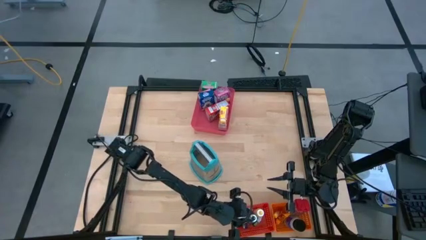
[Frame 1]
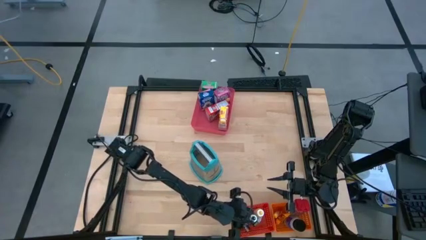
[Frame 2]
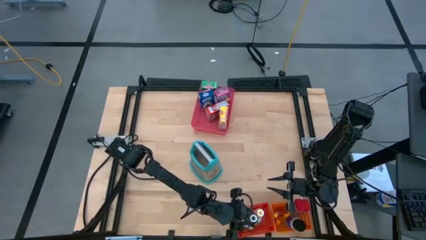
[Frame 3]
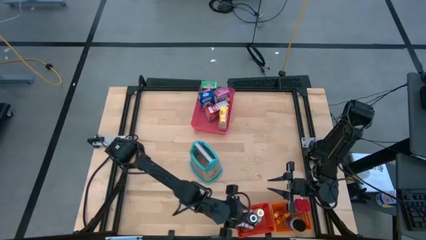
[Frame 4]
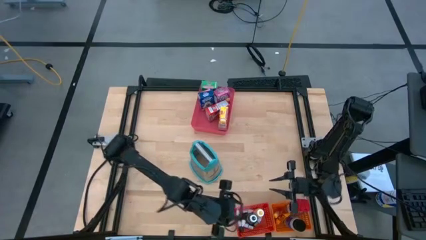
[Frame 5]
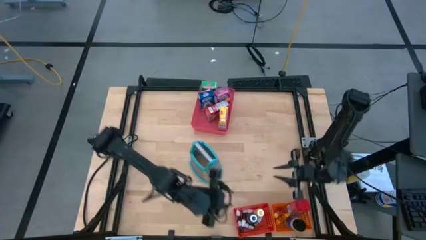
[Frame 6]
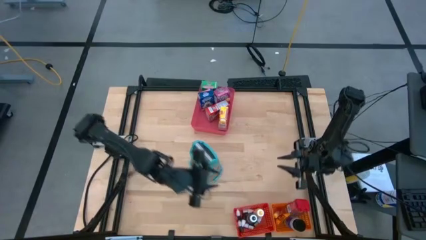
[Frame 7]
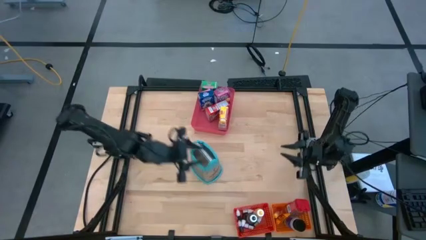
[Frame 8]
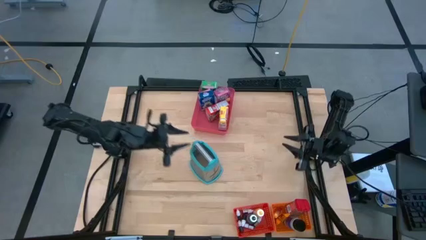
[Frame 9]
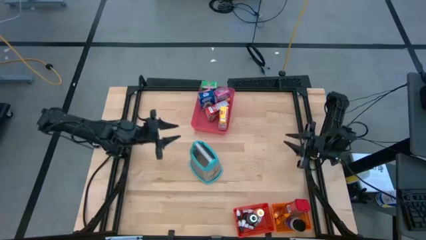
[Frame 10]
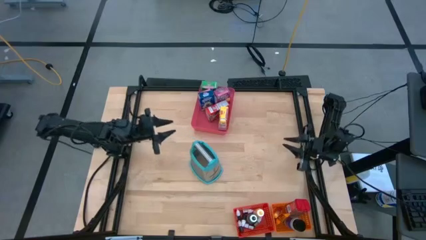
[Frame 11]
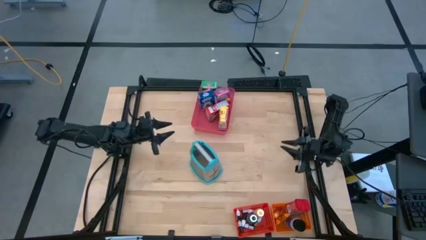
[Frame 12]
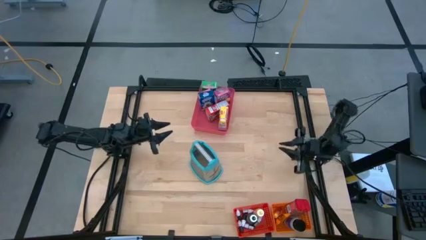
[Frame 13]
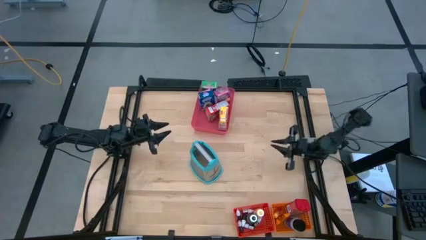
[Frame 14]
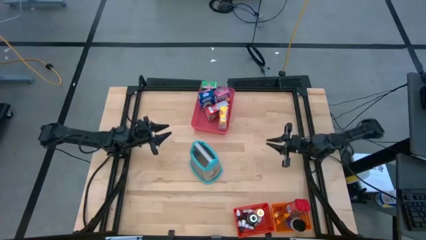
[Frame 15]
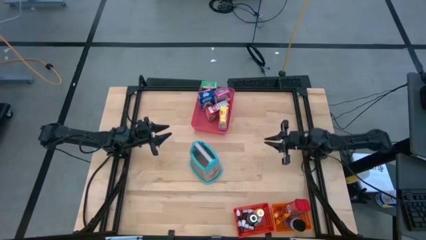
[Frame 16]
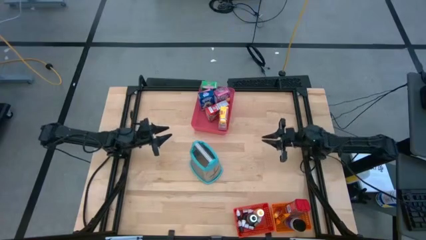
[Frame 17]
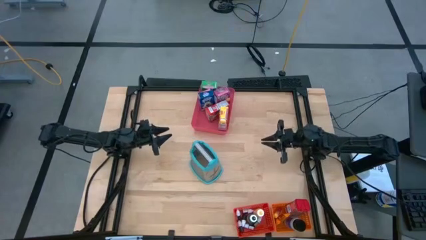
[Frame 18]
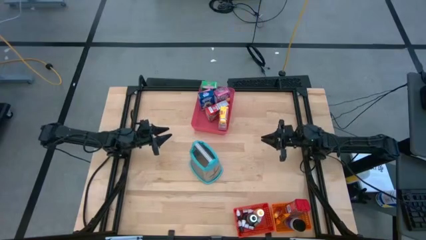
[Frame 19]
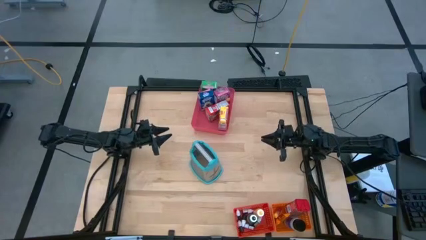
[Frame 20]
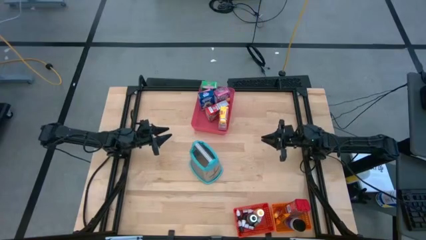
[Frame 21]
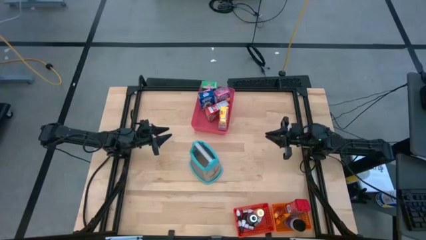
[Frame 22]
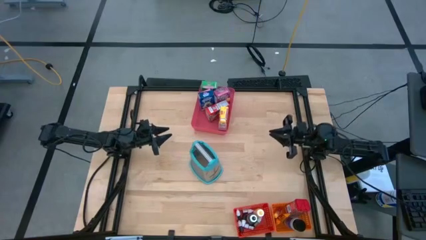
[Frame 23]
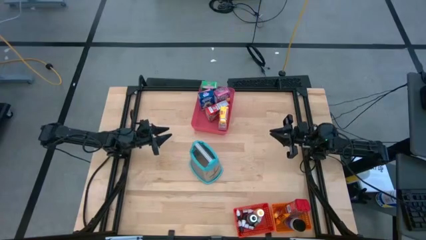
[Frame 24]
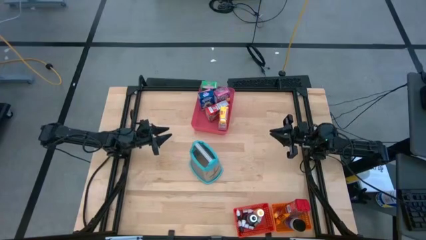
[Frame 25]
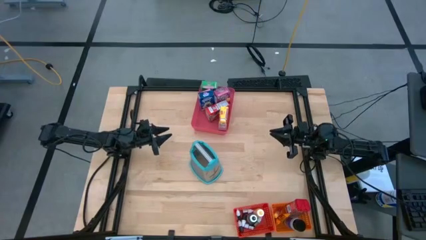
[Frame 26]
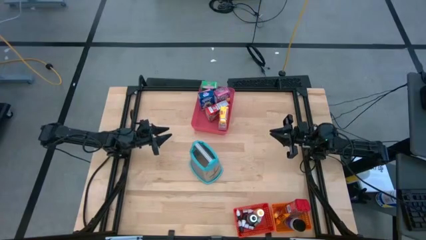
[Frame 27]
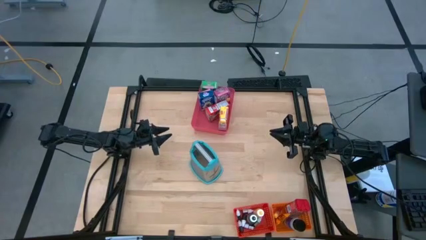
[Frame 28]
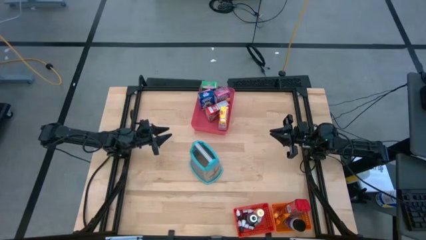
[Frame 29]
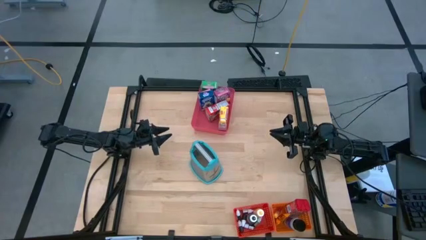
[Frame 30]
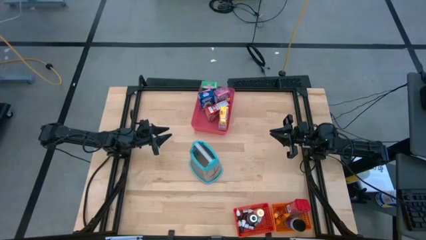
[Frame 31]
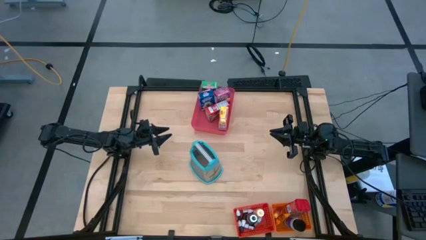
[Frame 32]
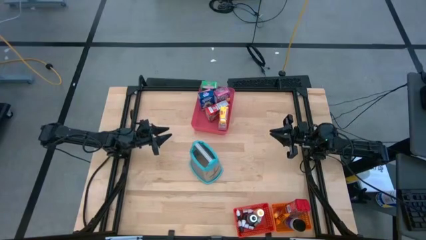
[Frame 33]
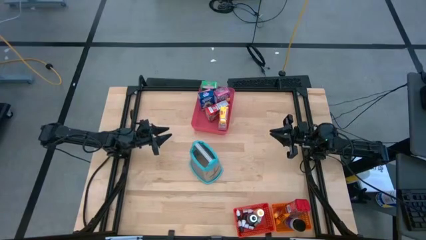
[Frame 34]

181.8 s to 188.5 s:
Task: Pick & Place Kitchen Items
Return to Home Position

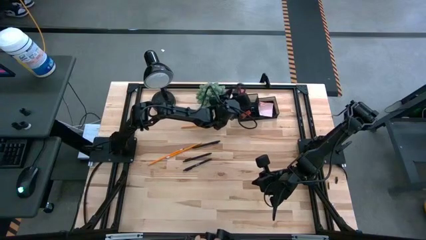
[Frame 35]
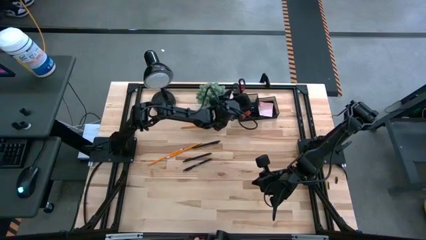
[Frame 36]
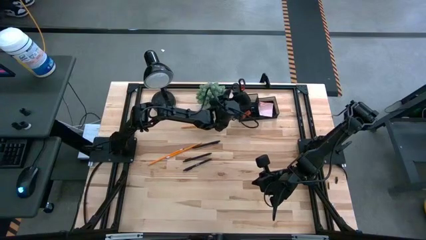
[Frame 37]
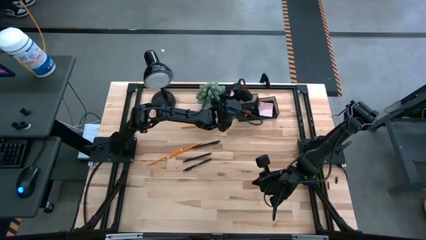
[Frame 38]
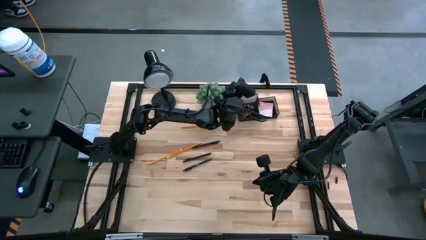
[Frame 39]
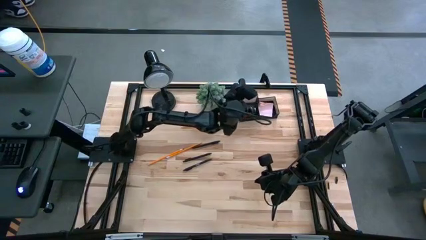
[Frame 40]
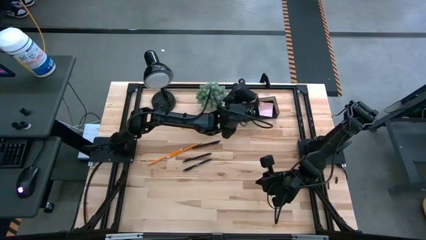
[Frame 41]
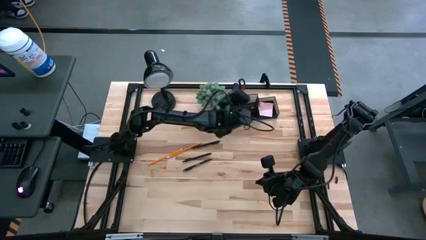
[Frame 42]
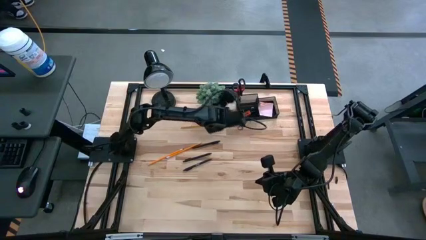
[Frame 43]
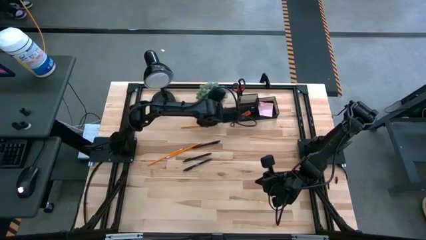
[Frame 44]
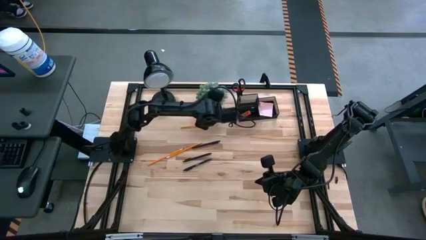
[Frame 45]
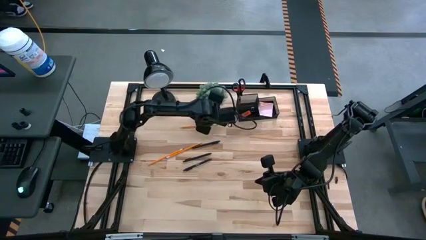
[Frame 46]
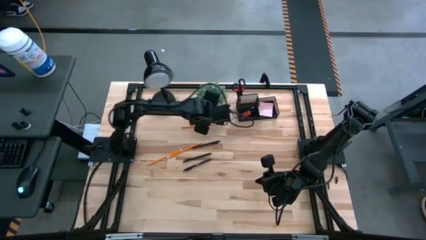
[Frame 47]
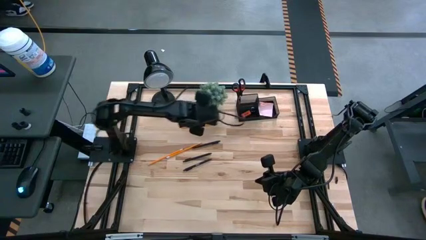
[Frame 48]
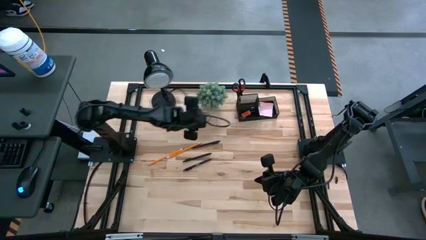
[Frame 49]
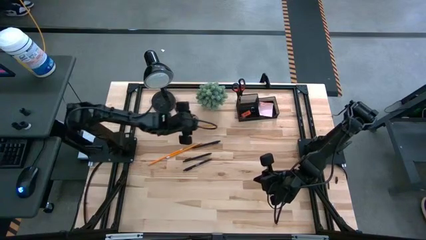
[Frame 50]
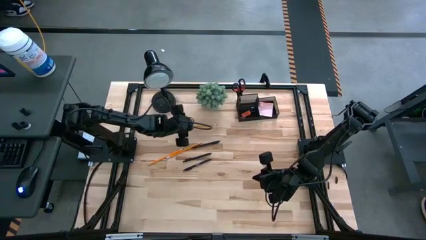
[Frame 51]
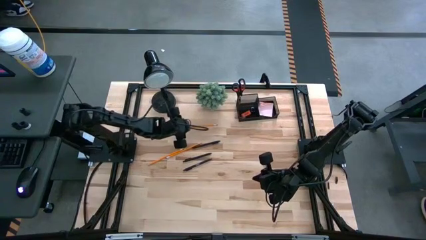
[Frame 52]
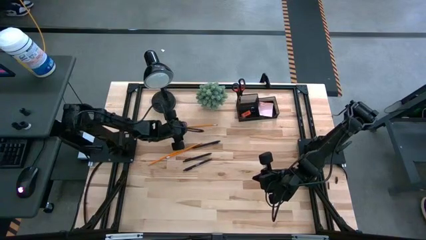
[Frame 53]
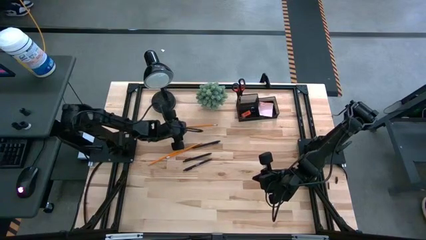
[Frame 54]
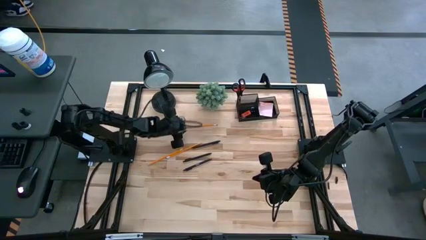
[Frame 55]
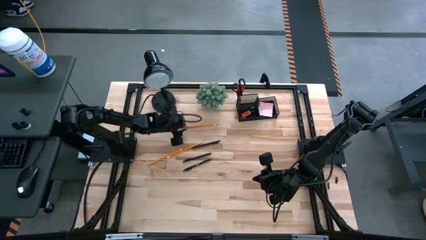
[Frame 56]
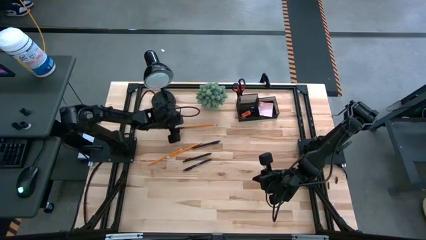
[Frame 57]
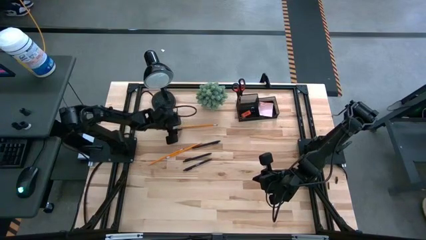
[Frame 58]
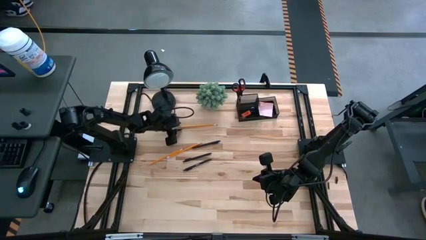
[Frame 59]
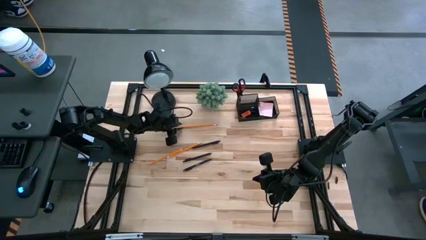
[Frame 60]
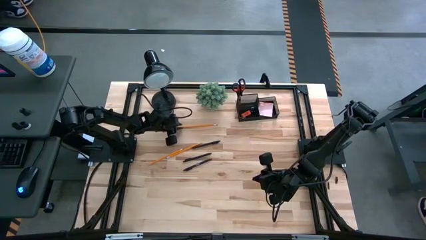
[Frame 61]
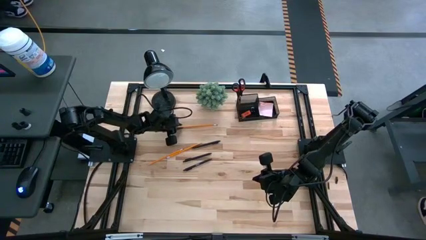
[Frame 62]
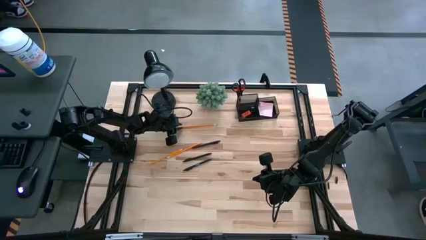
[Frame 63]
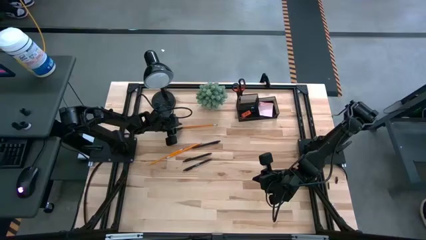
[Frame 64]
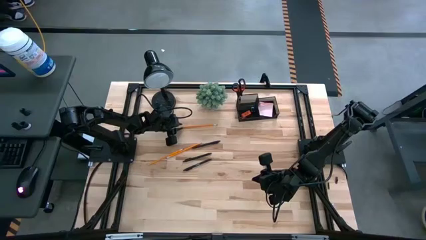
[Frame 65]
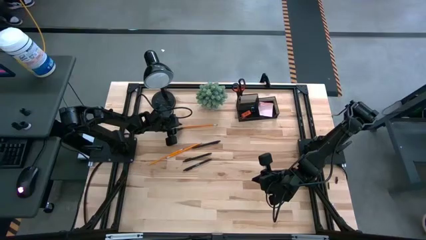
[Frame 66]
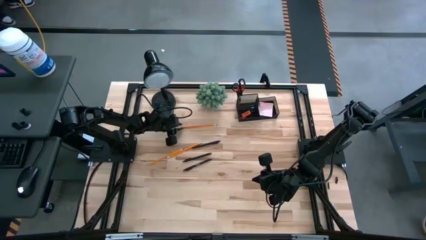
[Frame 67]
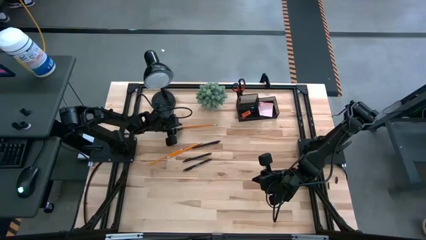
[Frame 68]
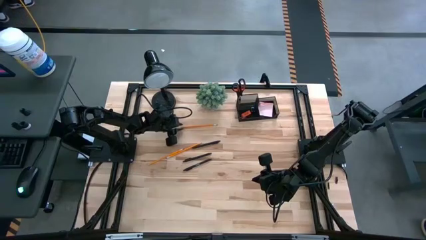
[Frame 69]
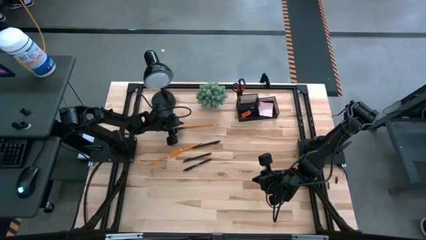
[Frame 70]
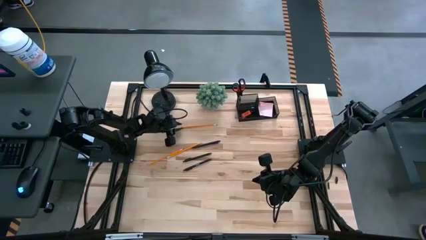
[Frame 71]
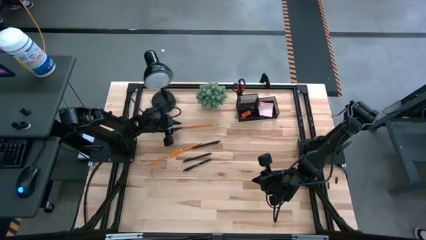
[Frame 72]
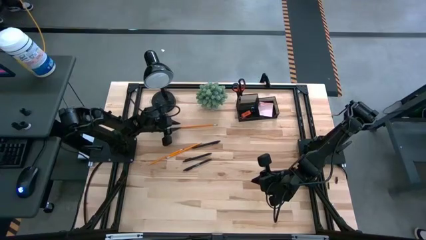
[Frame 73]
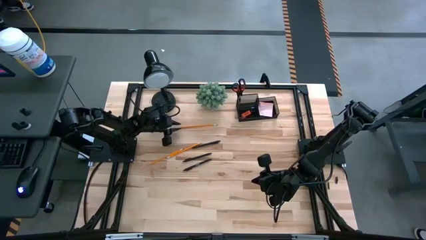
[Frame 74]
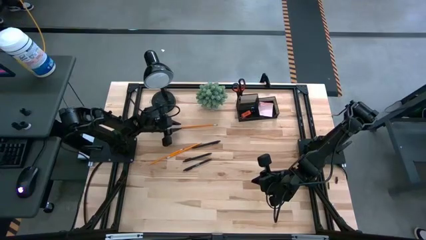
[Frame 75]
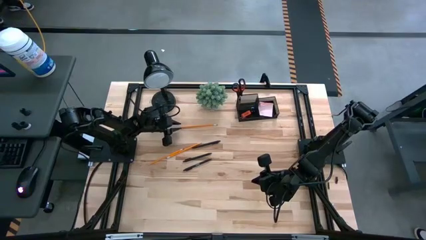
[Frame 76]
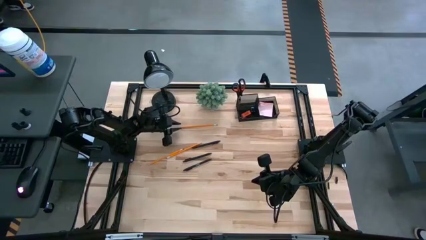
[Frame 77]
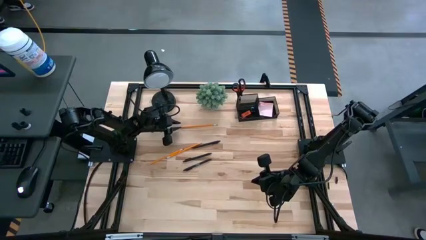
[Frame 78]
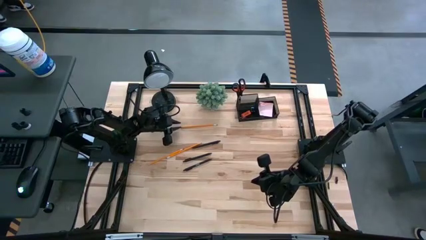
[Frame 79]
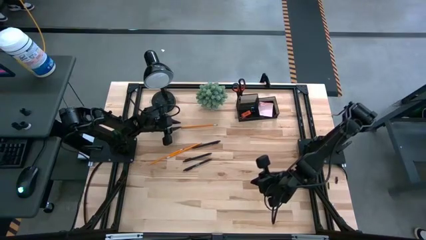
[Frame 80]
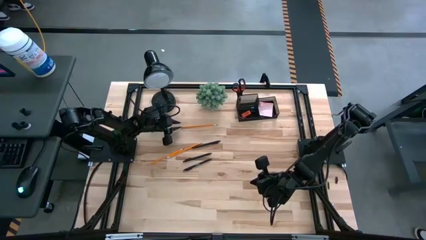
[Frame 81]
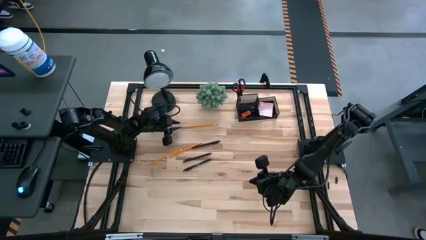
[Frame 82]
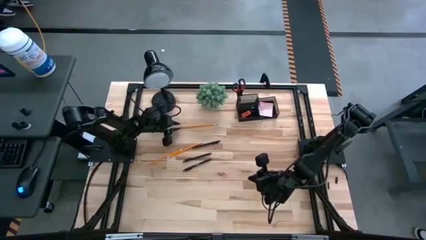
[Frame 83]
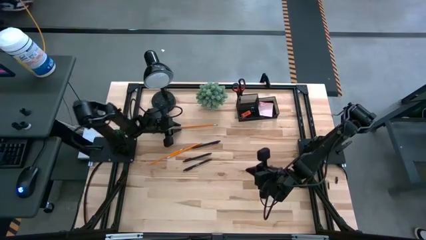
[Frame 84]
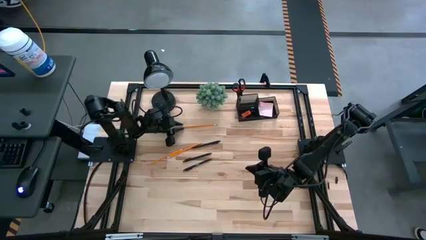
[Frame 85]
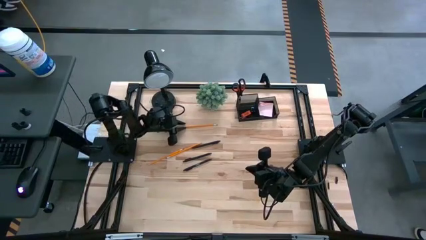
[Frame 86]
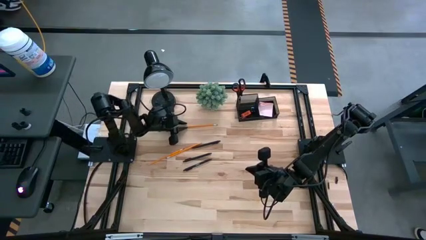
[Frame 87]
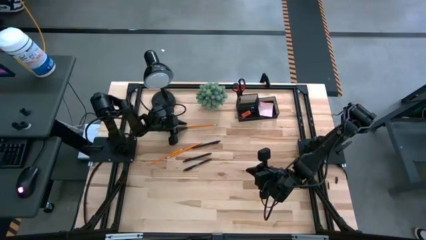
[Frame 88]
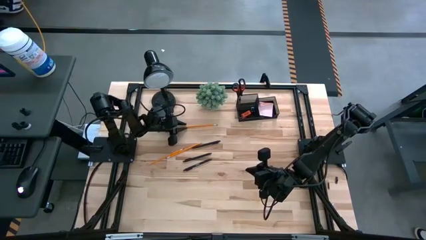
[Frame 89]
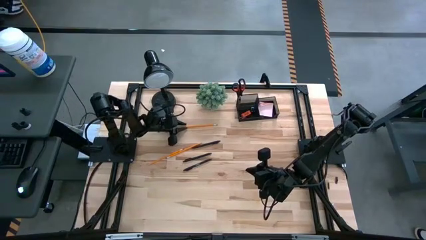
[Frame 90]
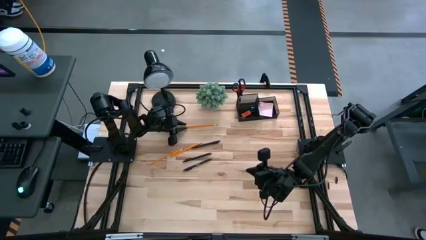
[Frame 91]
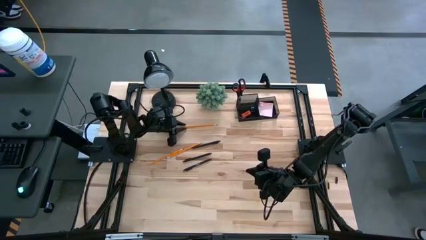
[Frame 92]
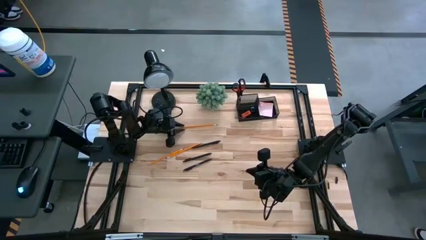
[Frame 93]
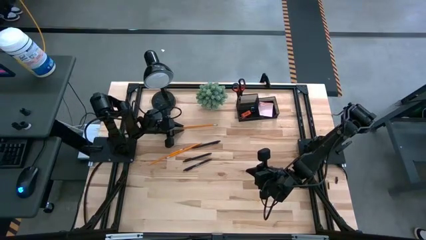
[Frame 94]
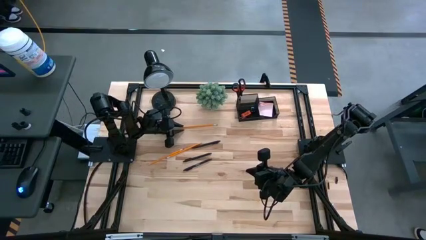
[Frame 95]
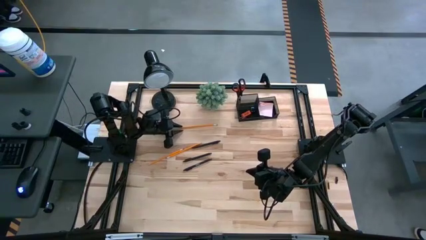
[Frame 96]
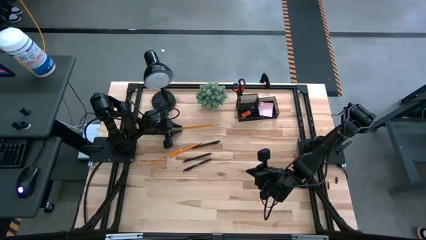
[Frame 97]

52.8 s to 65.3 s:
Task: Pick and place office supplies into organizer
Put the top orange pencil into the black desk organizer
